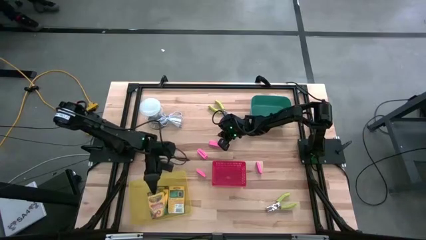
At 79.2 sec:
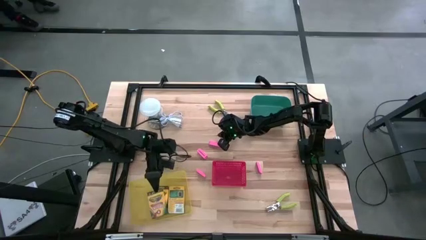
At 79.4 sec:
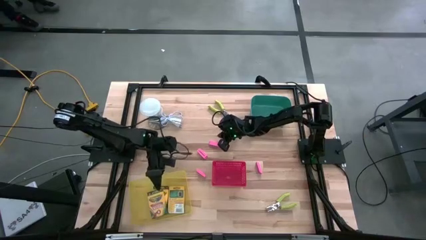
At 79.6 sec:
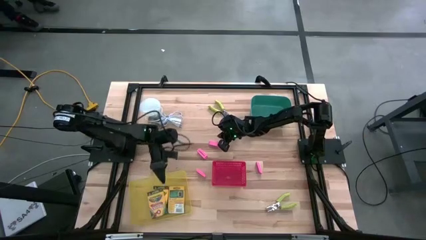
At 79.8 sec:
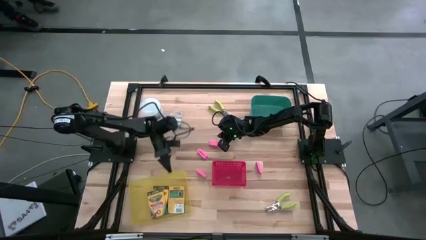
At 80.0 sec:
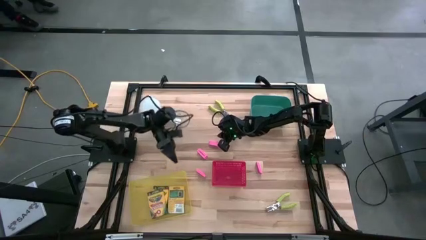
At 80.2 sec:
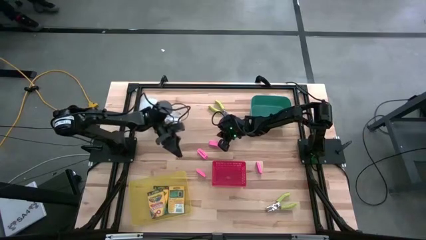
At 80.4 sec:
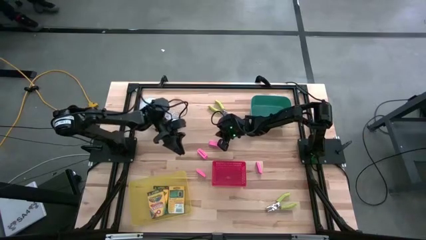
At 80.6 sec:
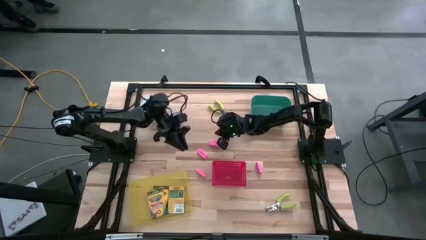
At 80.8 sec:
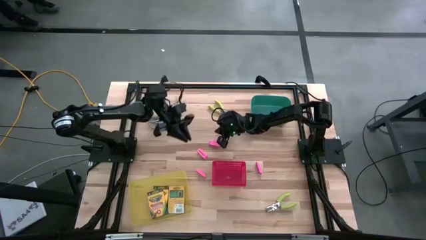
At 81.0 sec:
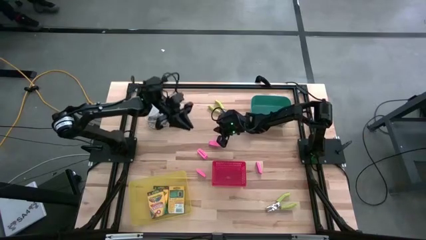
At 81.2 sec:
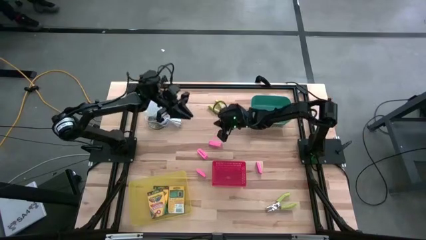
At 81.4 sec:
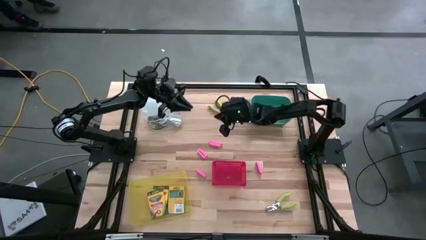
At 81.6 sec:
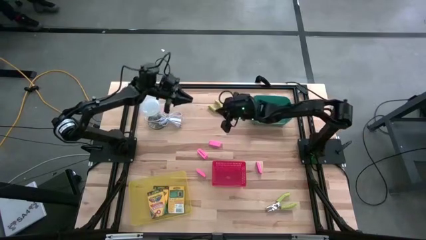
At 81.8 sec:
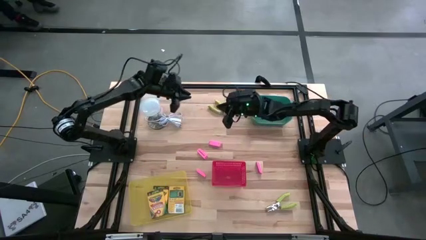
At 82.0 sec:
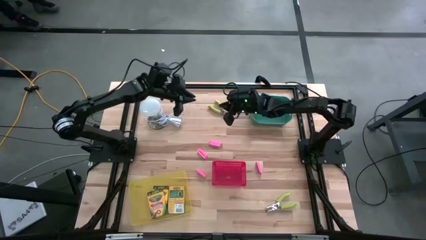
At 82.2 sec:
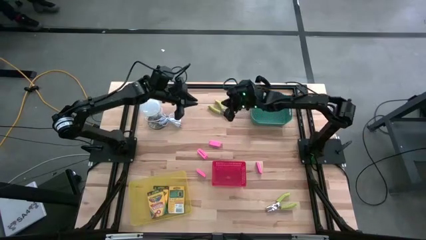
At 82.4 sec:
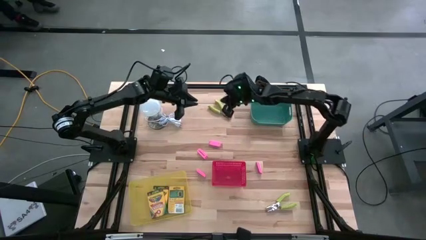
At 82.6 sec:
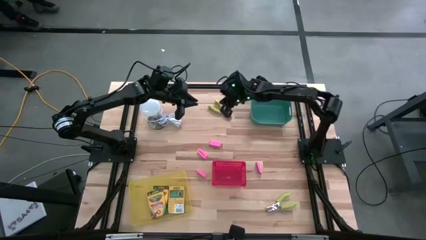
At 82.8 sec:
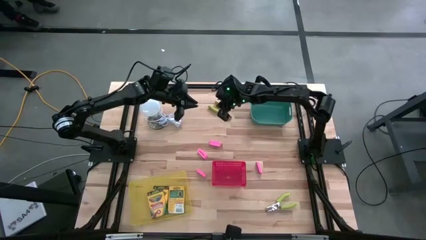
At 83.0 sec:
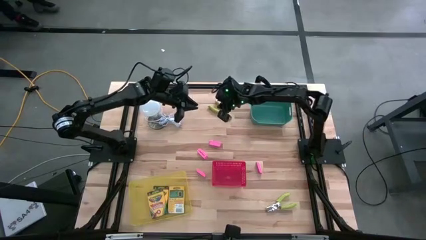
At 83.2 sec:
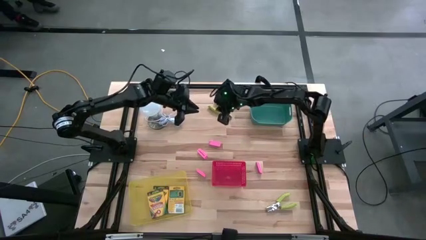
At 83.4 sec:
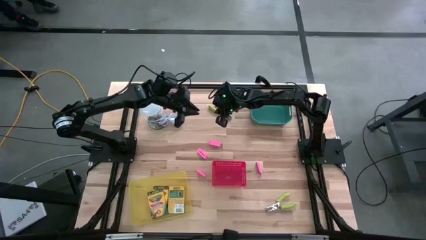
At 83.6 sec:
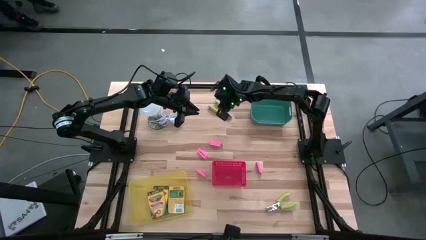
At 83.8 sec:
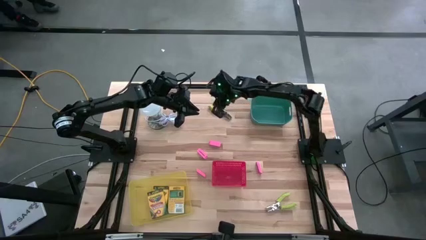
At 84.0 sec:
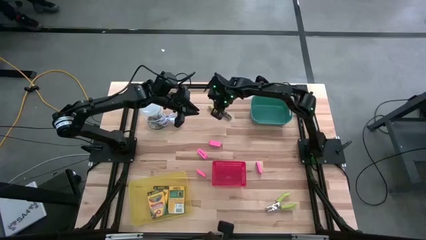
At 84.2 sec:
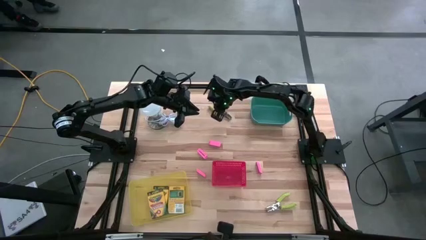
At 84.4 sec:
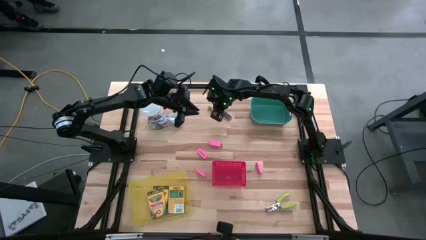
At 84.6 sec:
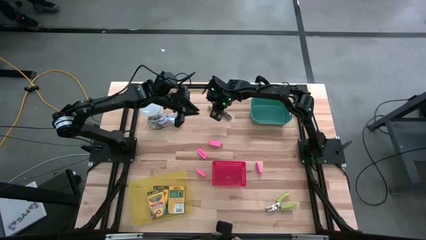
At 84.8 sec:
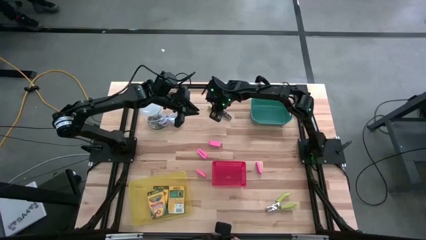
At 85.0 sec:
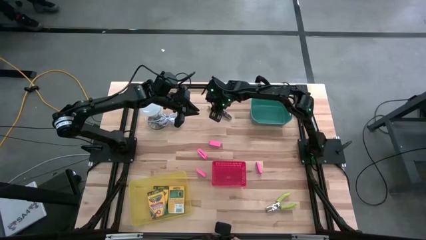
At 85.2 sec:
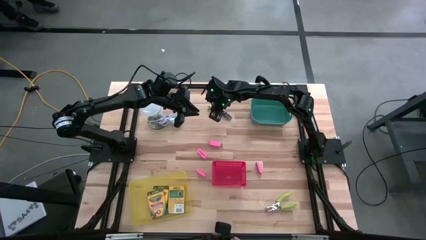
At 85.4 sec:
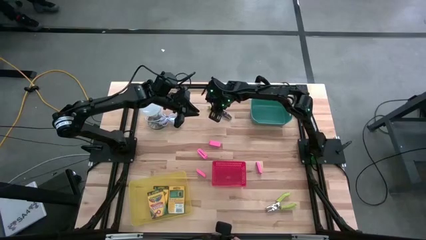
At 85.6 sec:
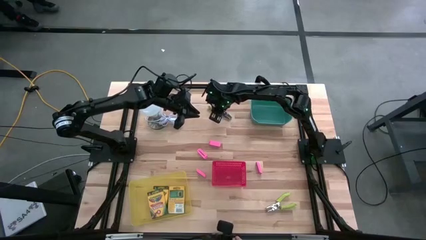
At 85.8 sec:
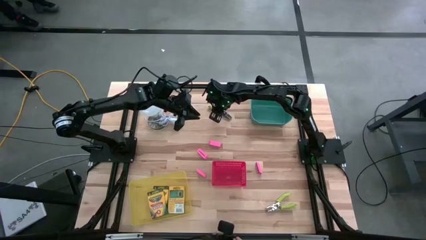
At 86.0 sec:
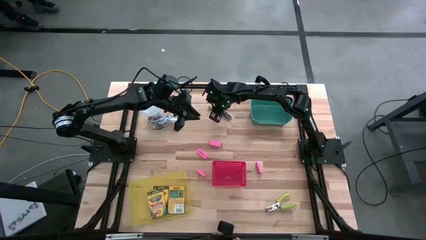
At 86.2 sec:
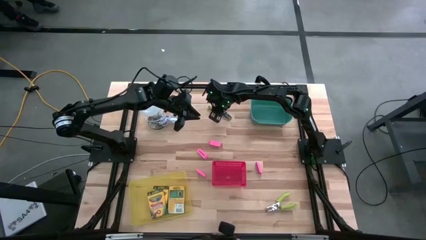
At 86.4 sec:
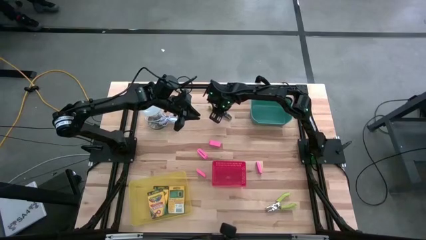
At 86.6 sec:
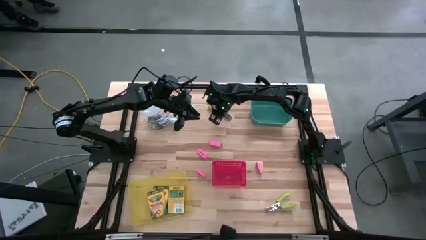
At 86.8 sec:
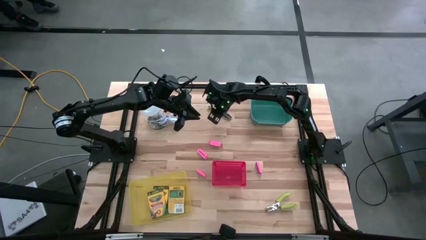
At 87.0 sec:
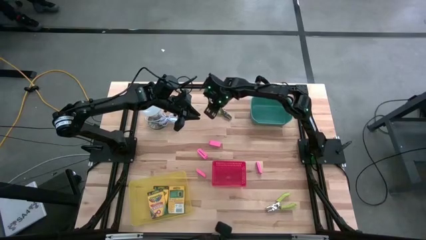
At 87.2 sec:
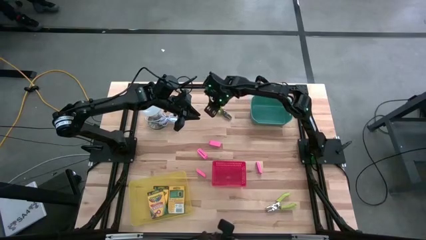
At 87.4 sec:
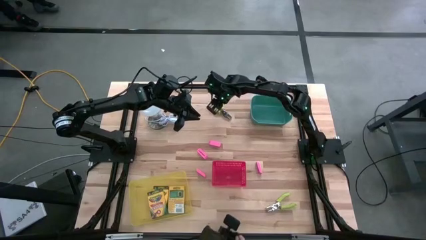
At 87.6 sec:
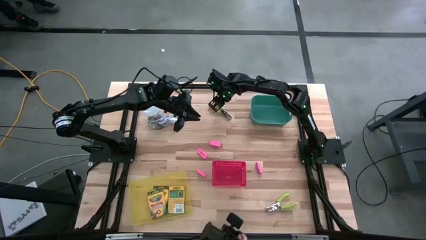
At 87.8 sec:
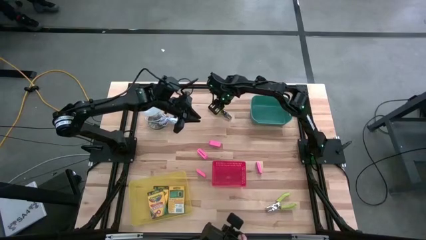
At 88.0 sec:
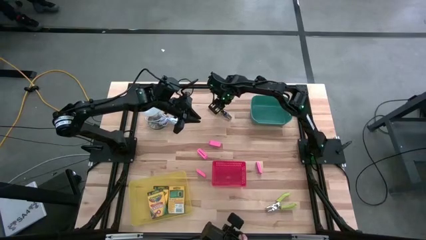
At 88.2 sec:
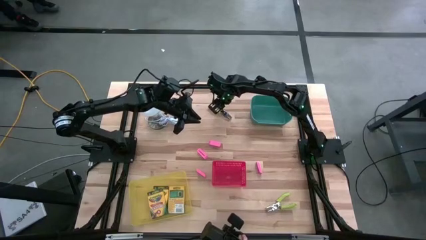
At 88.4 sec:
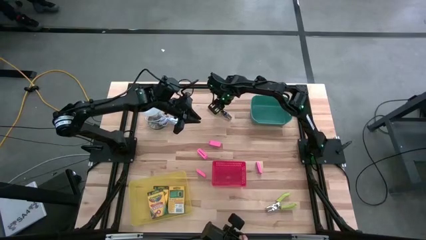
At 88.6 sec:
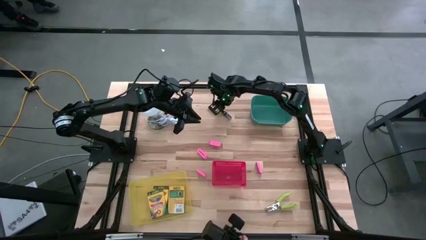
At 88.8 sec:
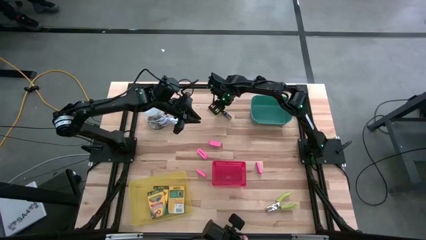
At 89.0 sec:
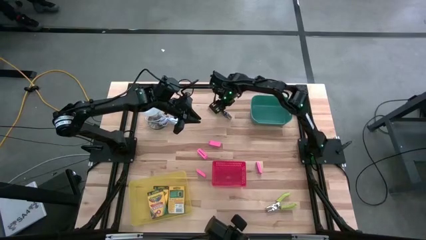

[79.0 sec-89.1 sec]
Task: Pick & Place School Supplies
Put the top bright green hole punch into the green bin

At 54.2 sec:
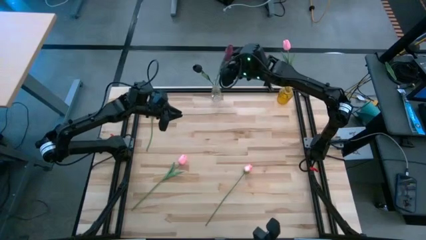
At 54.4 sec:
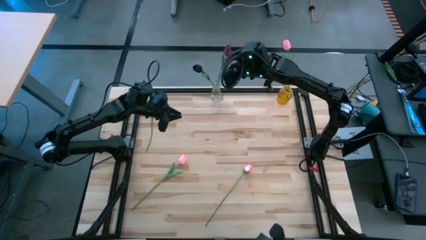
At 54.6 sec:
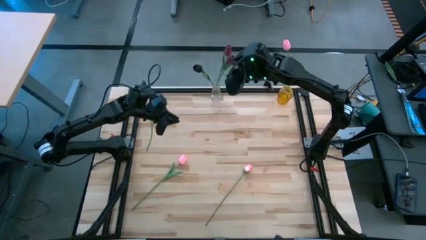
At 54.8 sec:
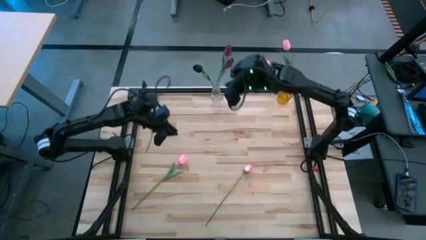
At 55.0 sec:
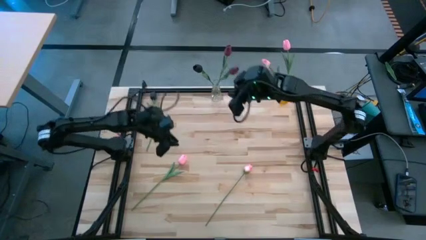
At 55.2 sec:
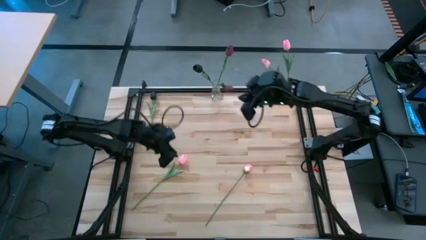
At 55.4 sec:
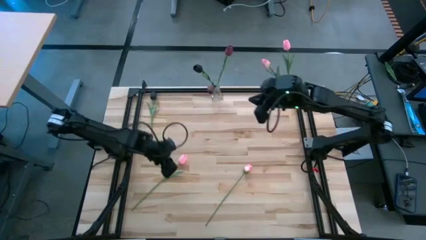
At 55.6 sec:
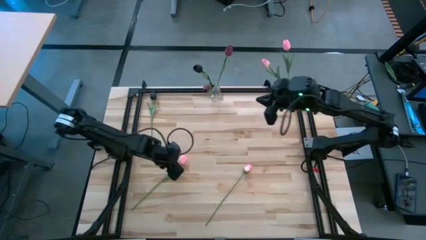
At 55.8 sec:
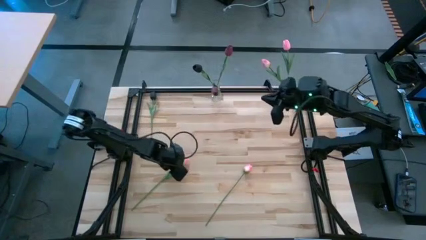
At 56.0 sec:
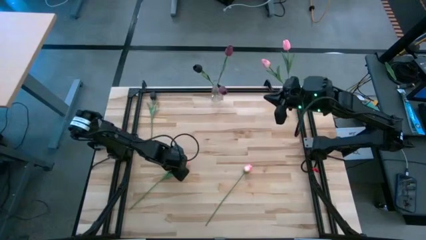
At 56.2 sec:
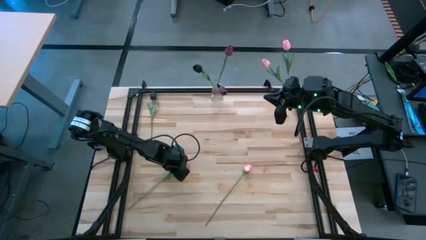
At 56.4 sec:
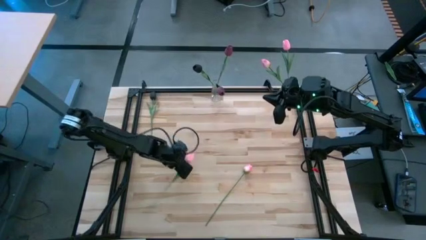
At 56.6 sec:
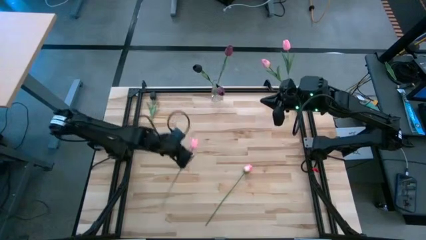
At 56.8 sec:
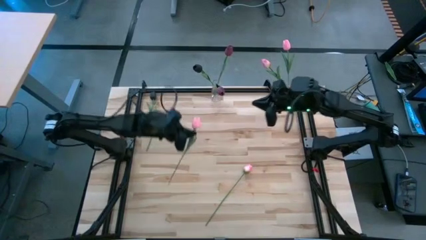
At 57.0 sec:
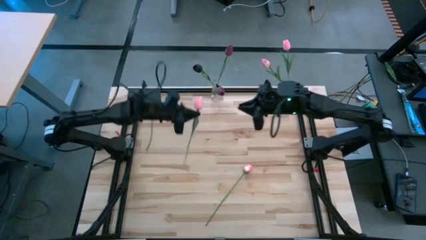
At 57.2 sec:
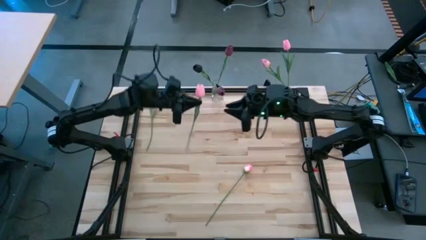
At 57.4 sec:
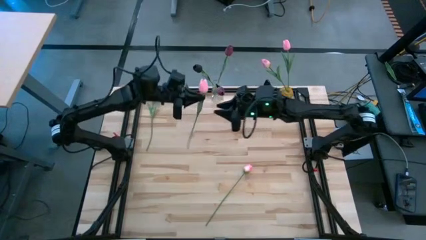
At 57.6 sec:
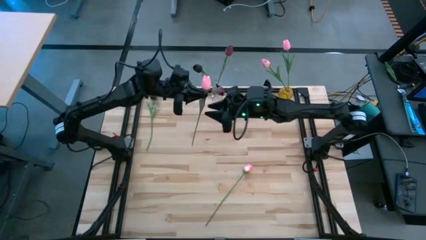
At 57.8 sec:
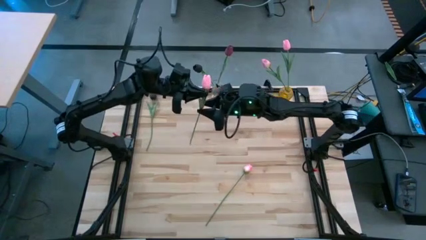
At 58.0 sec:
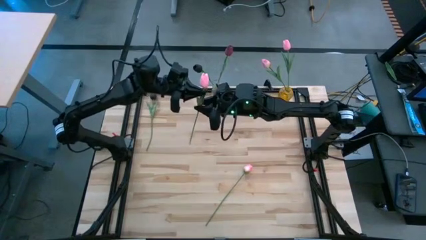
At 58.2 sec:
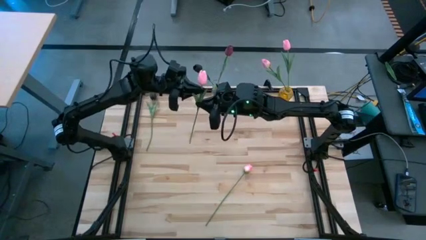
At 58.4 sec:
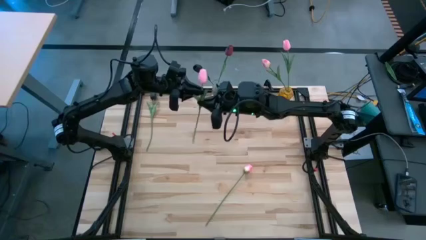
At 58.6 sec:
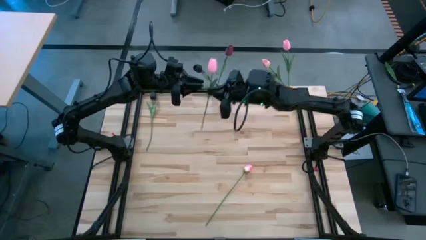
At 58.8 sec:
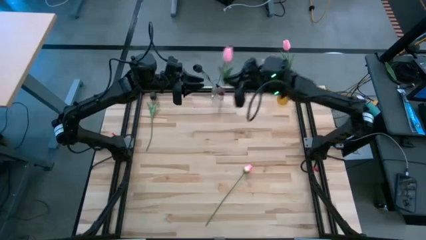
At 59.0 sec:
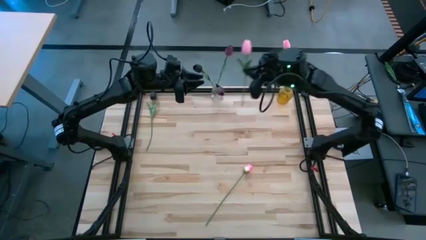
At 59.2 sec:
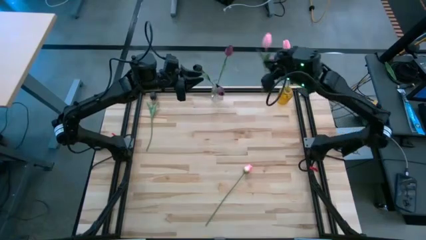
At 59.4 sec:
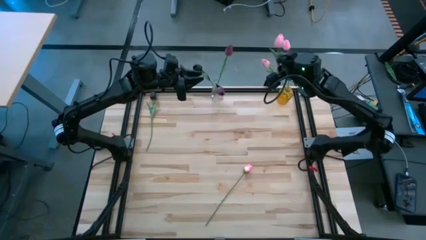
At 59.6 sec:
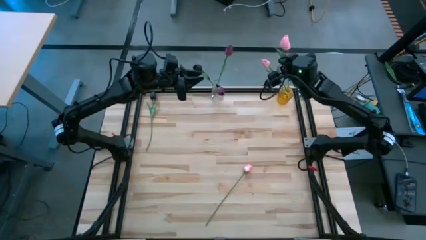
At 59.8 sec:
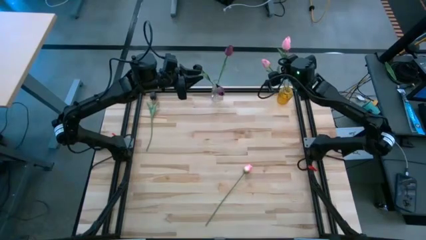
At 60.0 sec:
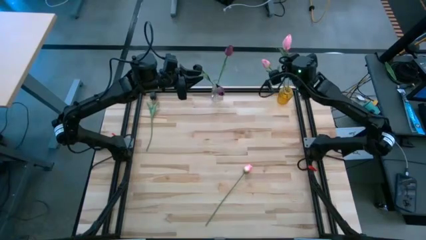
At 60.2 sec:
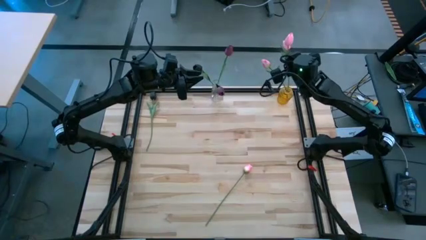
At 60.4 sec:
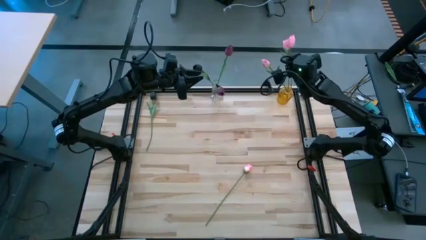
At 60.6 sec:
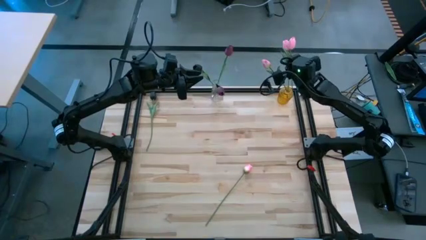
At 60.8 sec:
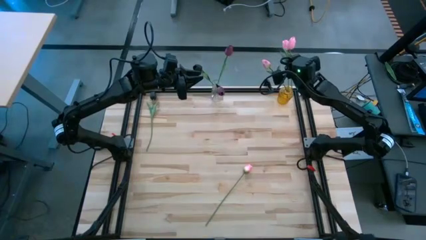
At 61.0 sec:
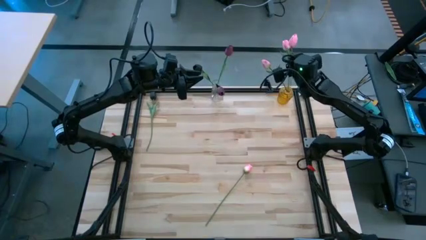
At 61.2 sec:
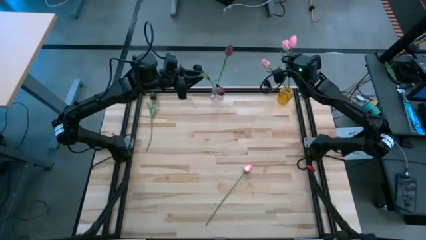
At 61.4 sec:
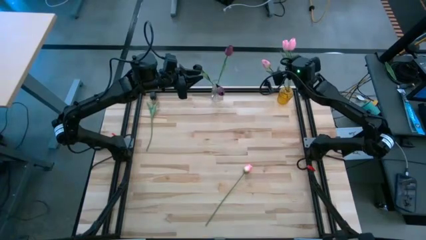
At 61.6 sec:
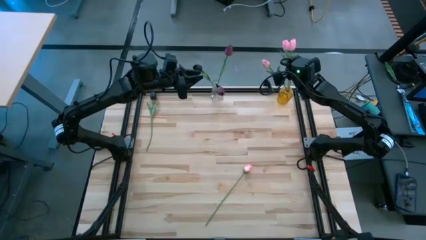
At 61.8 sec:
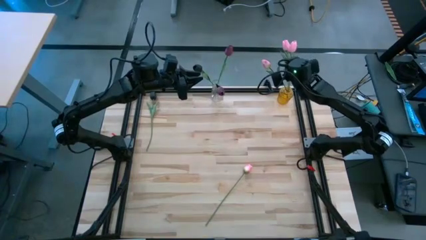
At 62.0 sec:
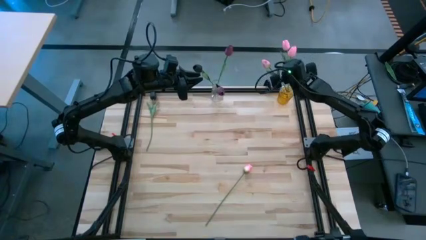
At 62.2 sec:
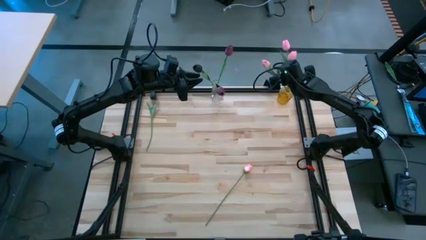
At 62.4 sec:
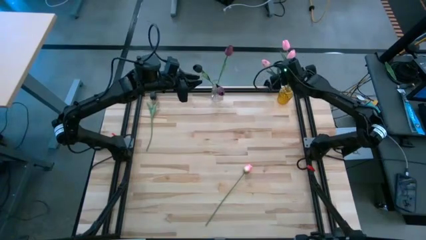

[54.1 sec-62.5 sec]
Task: Sort flowers into vase by color
Put the left pink tulip into the yellow crystal vase
